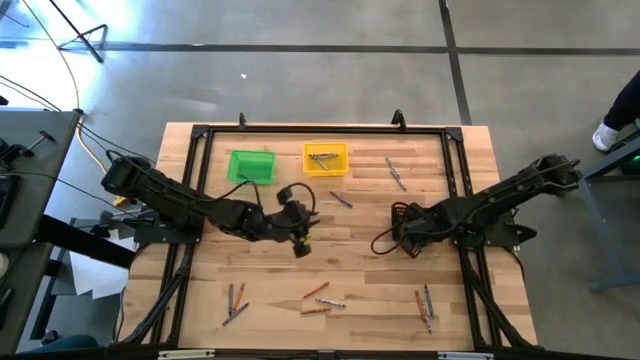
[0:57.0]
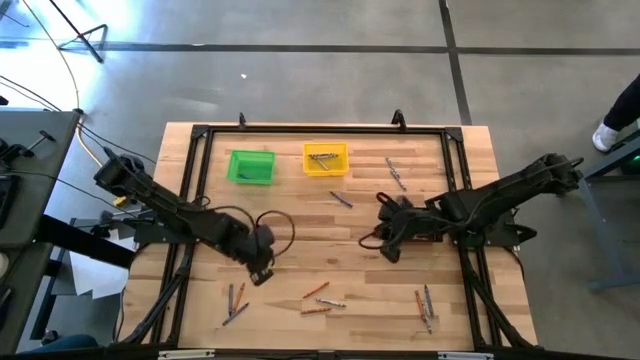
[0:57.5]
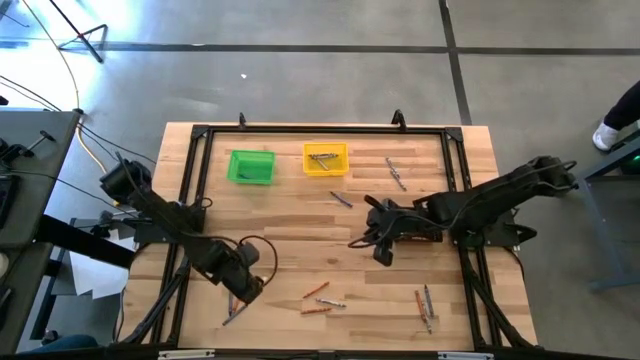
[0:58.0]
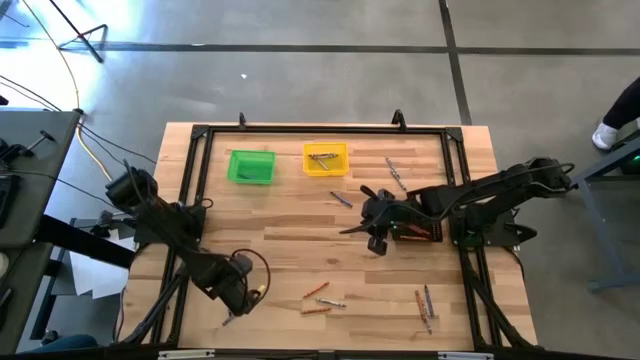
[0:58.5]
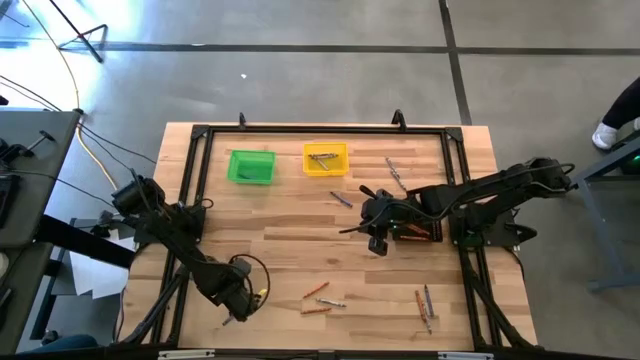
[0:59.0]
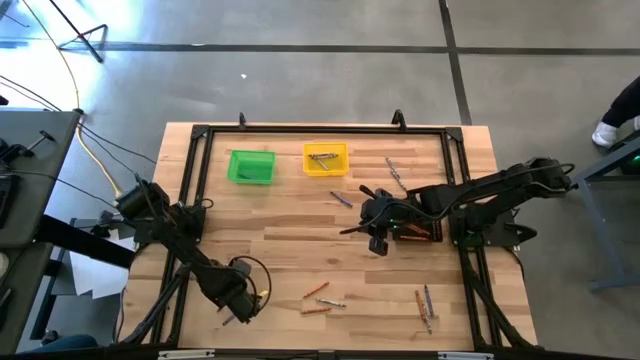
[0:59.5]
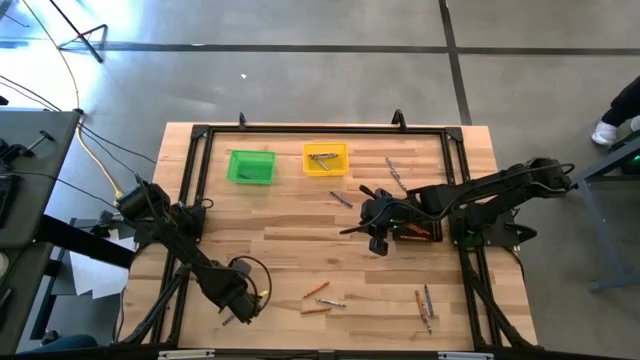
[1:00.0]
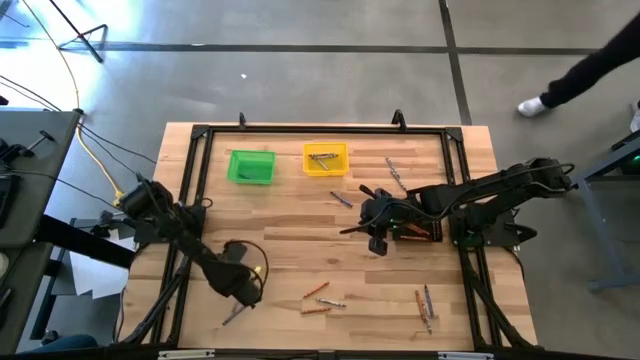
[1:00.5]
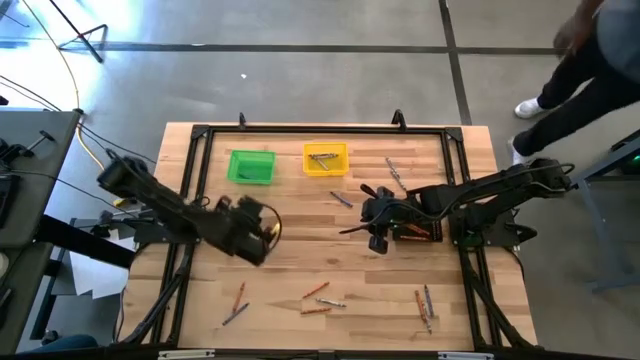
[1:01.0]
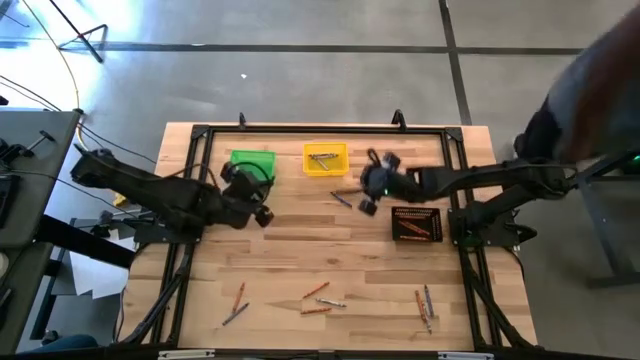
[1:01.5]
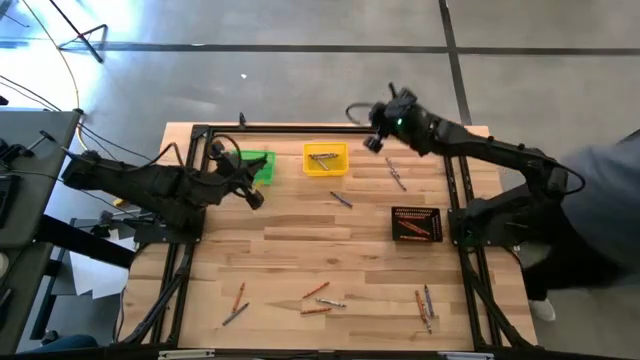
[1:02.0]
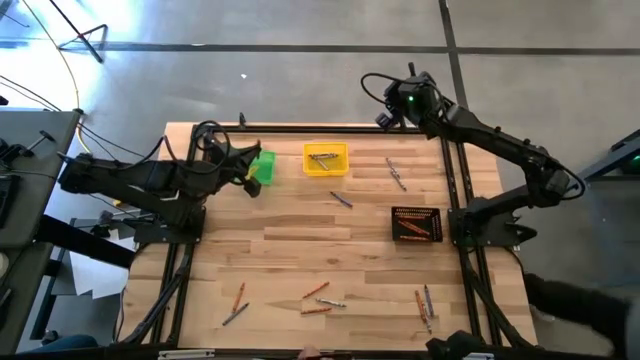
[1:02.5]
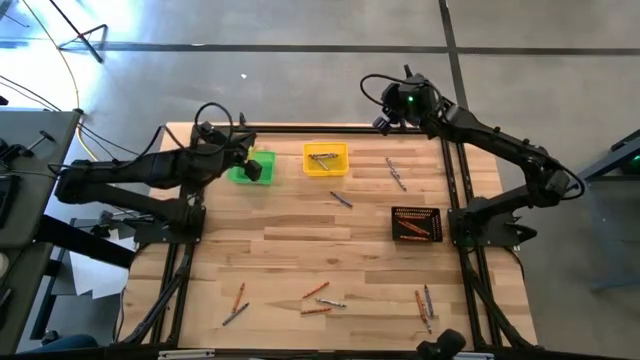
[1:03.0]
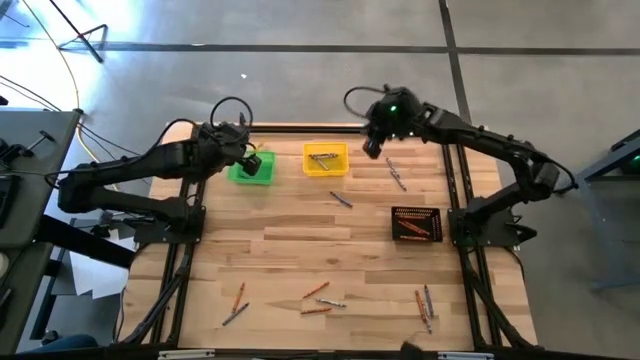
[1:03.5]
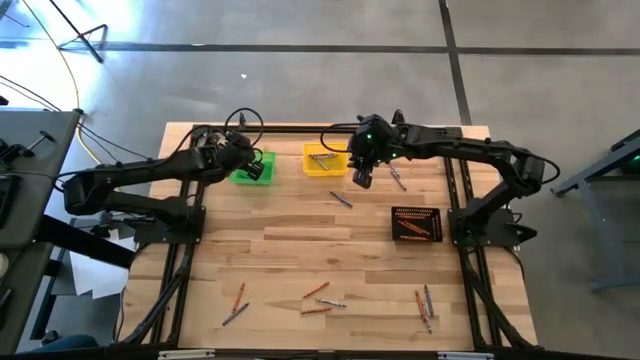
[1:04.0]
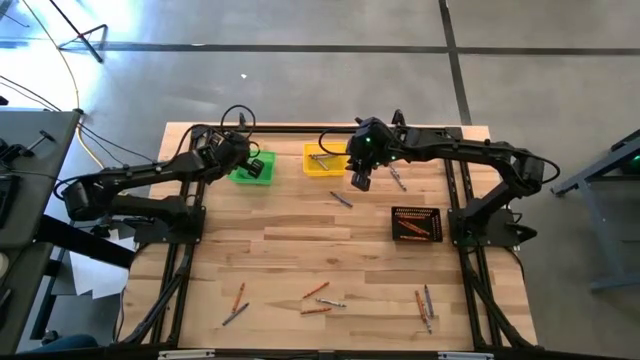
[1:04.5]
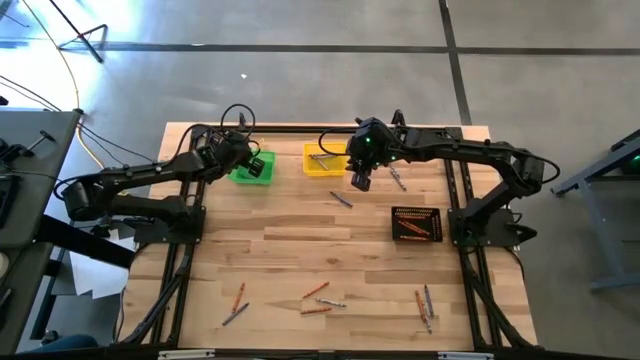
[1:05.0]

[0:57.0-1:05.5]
Task: Sort crayons
Put the blue crayon into the green bin

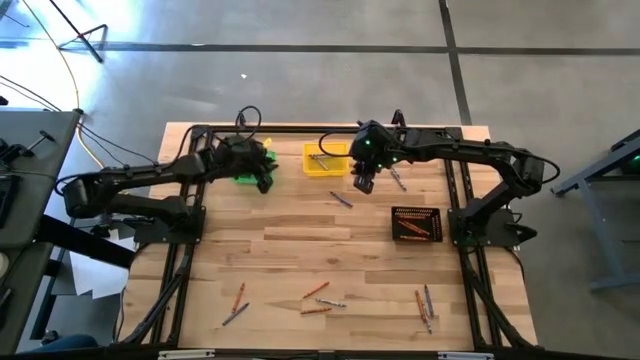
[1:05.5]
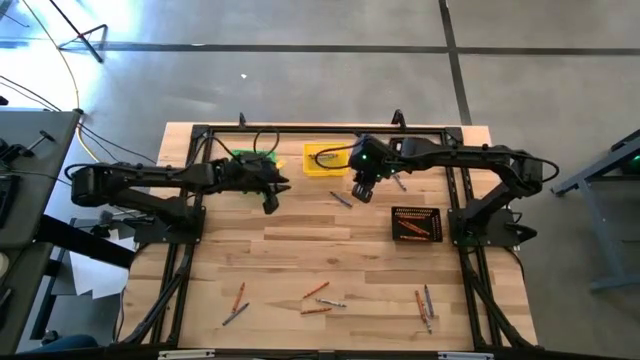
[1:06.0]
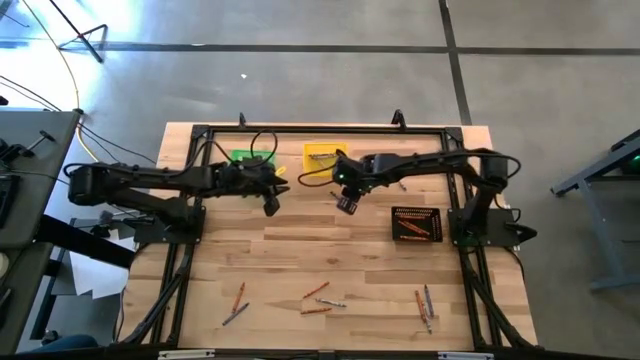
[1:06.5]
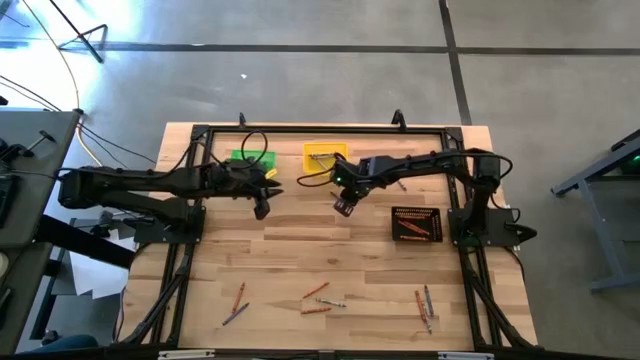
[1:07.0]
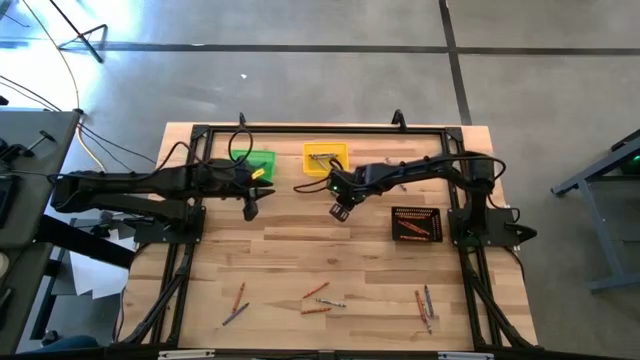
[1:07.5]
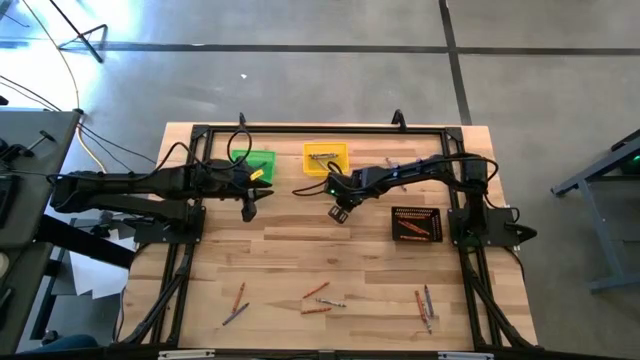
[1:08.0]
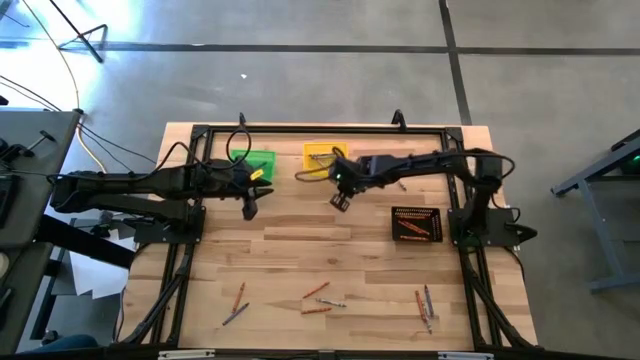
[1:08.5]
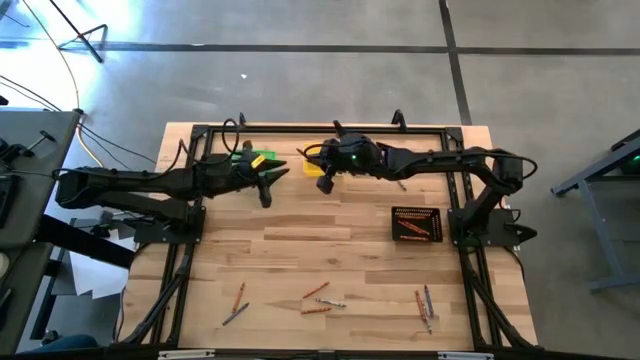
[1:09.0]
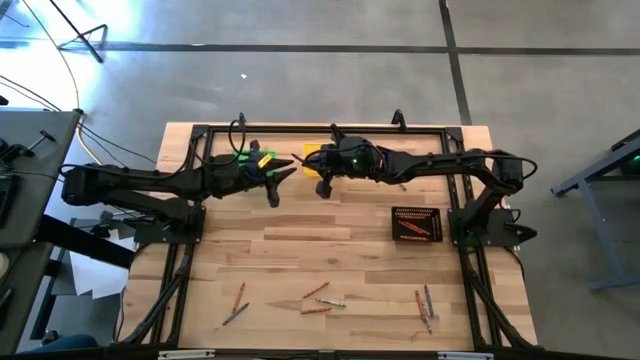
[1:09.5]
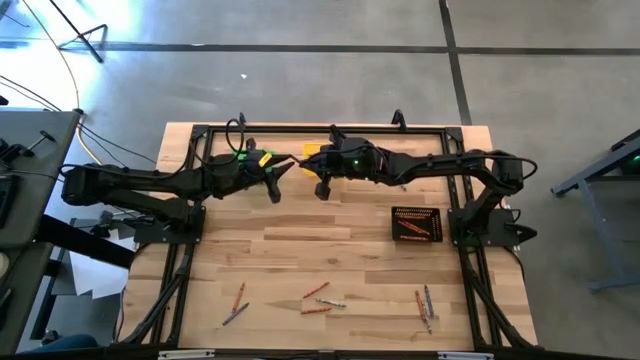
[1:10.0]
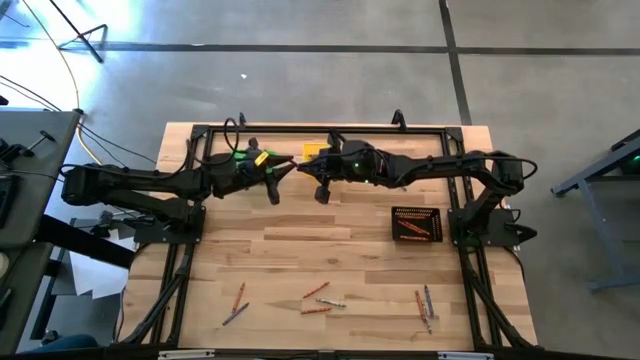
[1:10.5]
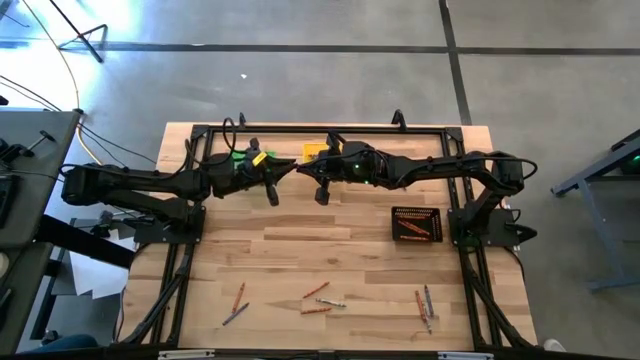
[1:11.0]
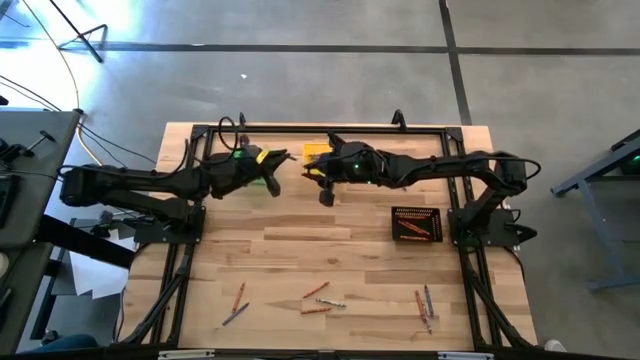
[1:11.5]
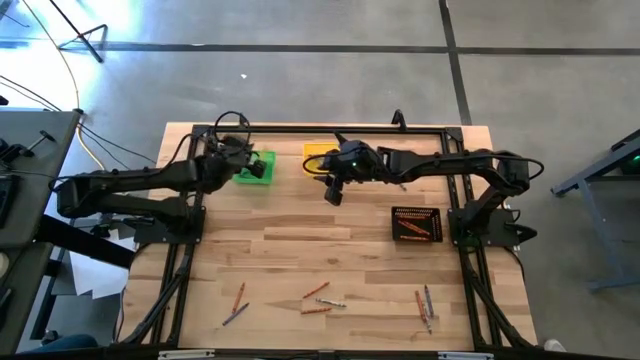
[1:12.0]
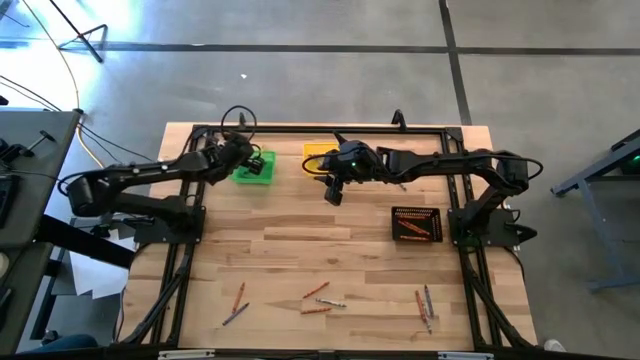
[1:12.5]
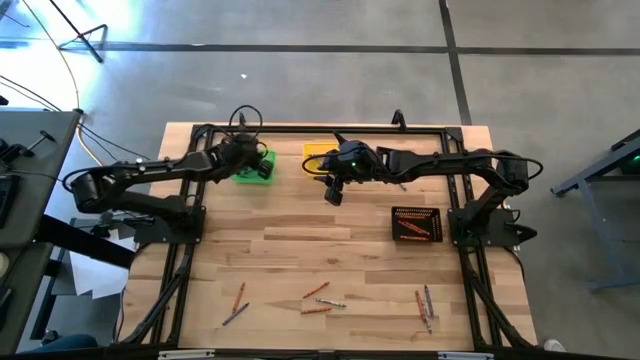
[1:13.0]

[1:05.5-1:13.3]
Put the blue crayon into the green bin

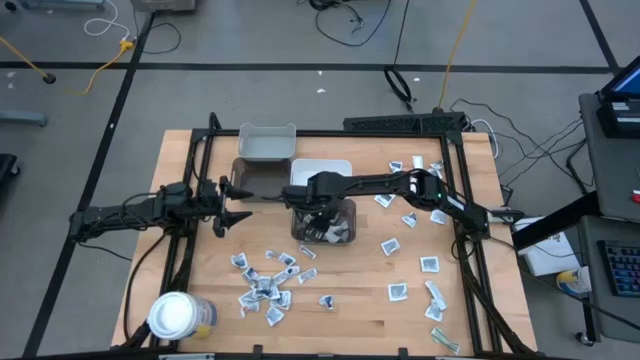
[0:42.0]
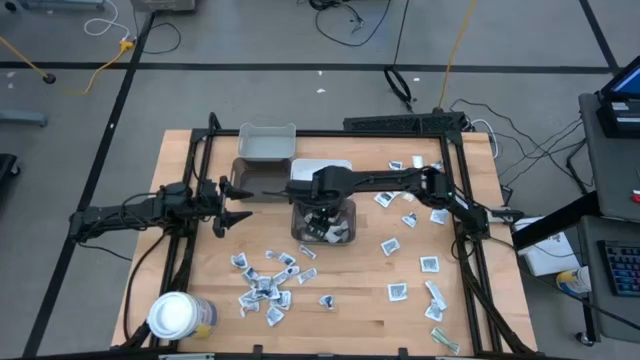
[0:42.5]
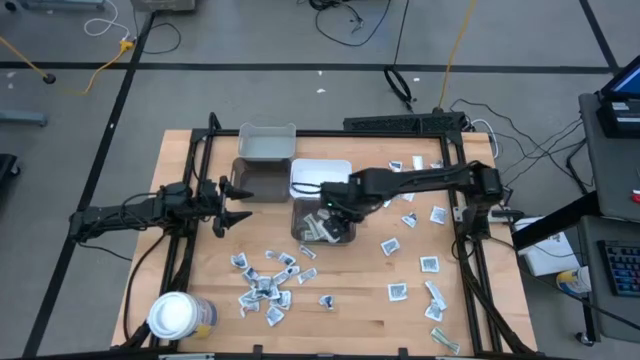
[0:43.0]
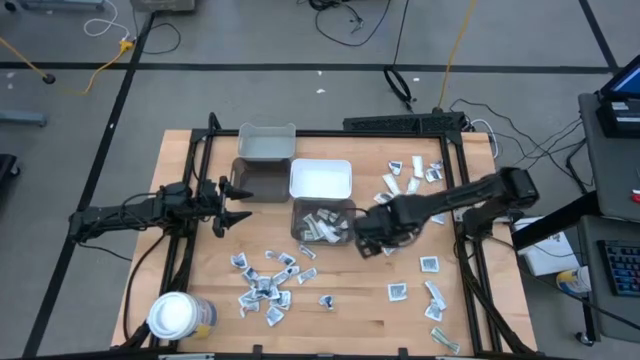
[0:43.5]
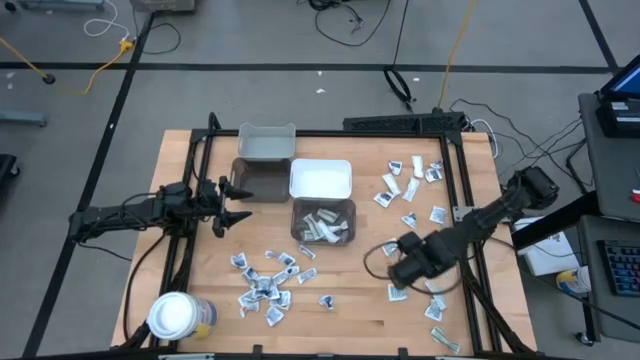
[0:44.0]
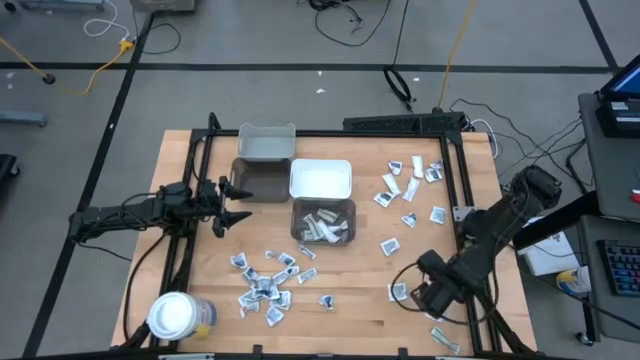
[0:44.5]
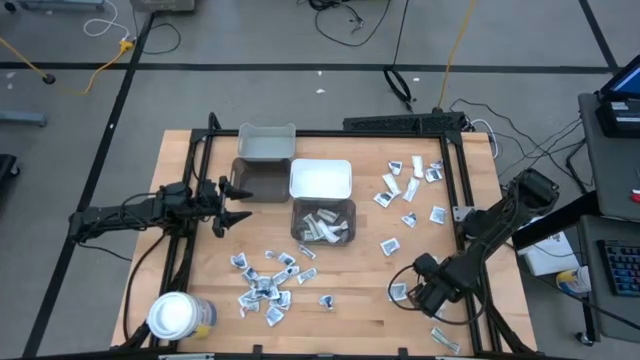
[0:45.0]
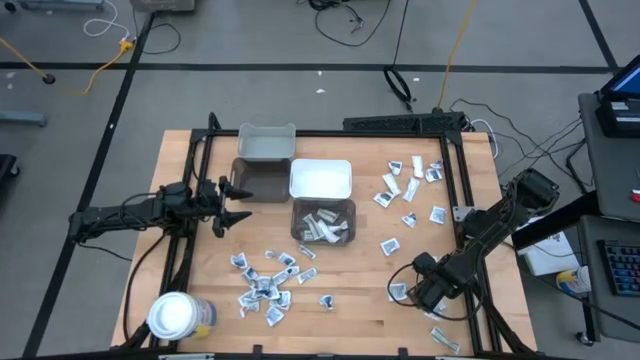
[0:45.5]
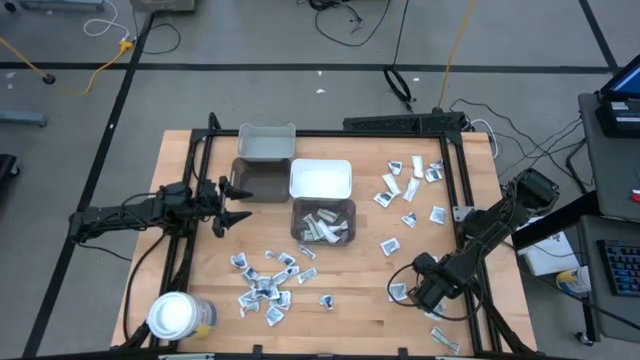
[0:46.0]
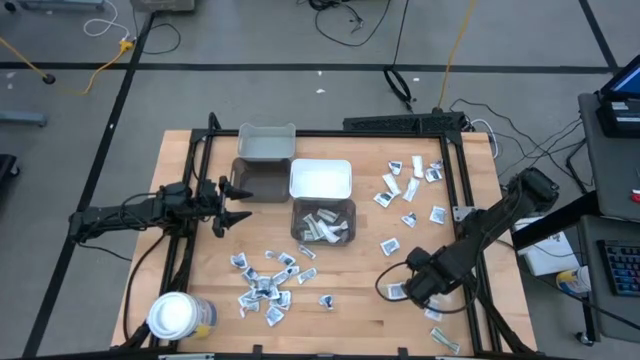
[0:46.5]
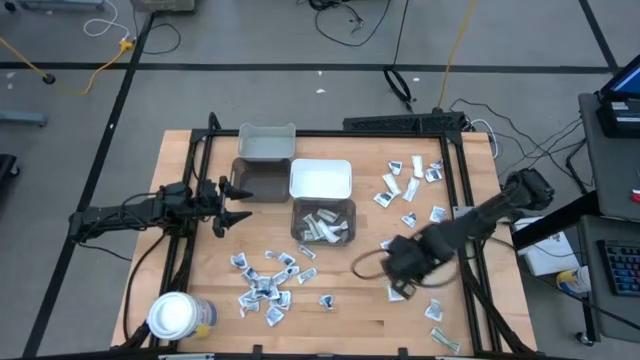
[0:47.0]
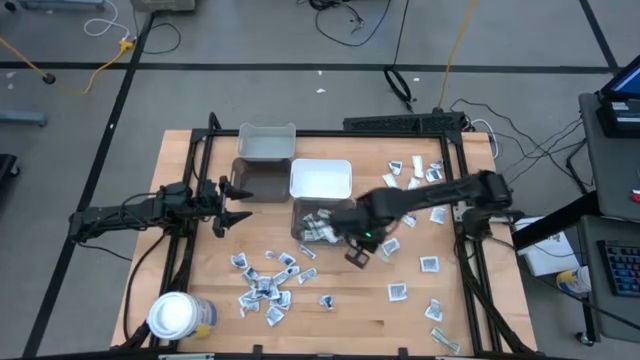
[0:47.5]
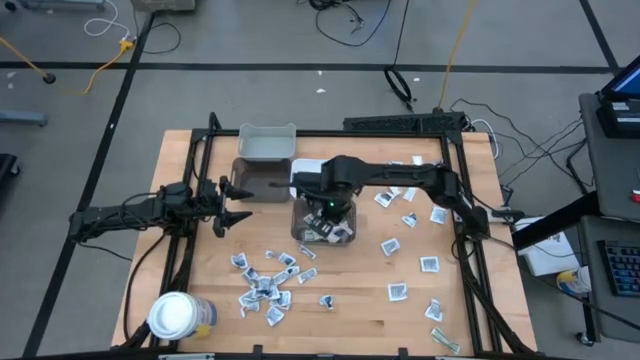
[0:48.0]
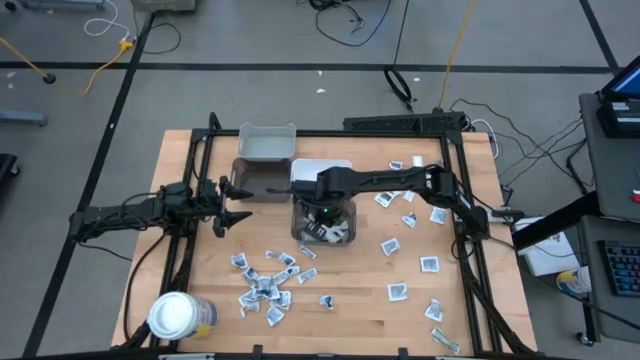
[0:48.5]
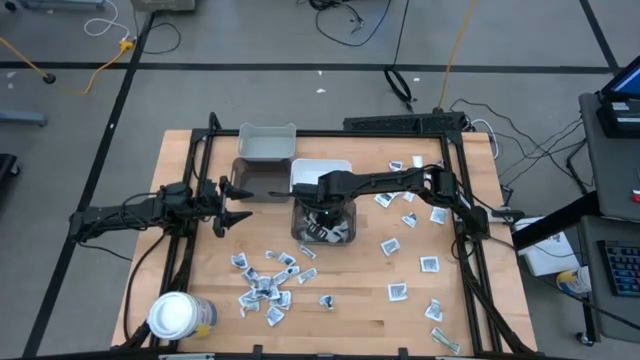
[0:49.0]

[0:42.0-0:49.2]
Task: Pick & Place First Aid Supplies
Put the green bandage pack into the right black bin
